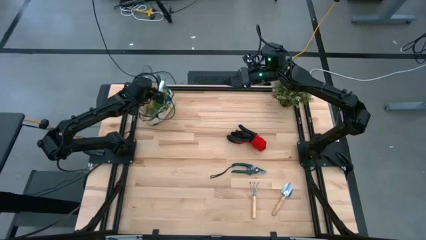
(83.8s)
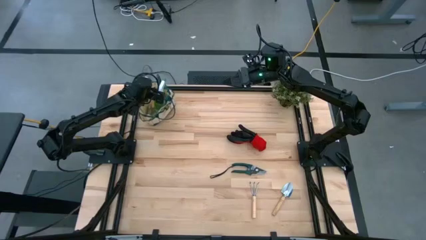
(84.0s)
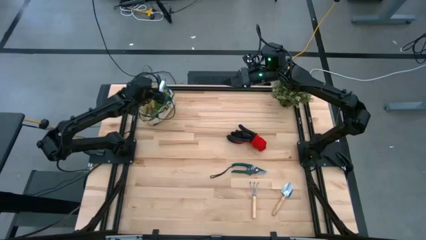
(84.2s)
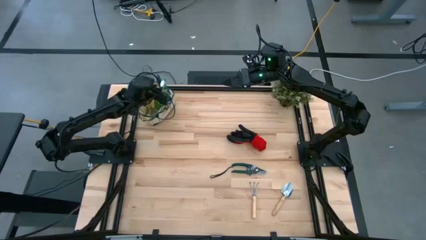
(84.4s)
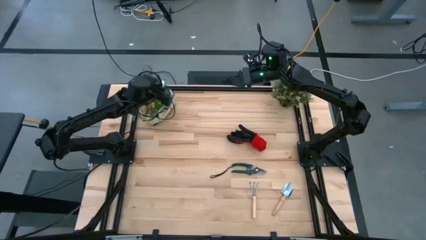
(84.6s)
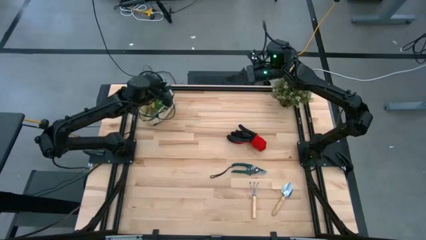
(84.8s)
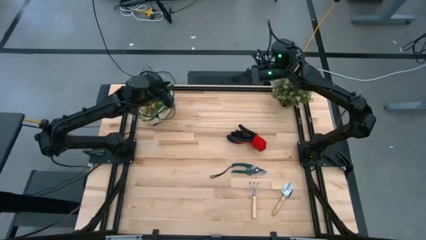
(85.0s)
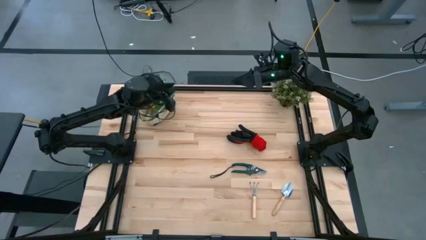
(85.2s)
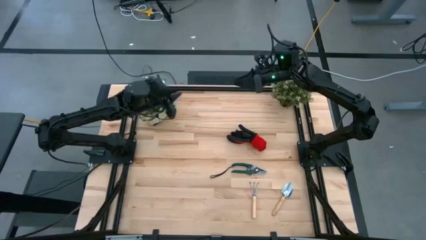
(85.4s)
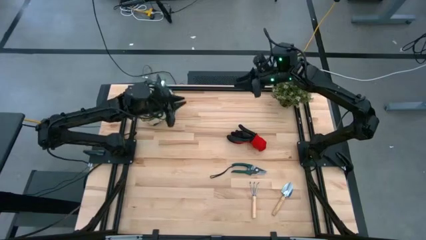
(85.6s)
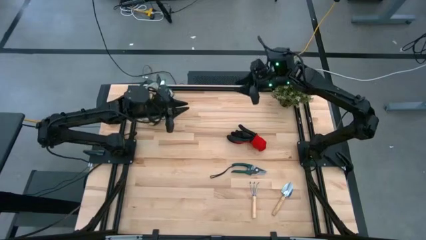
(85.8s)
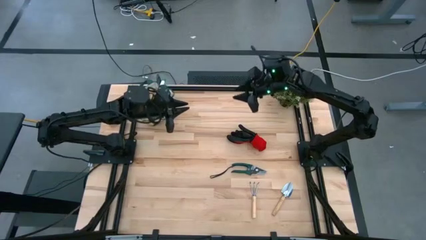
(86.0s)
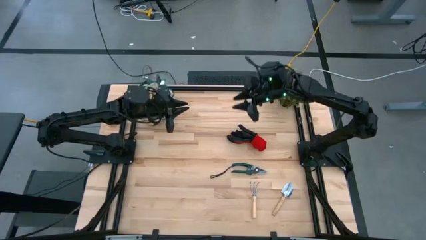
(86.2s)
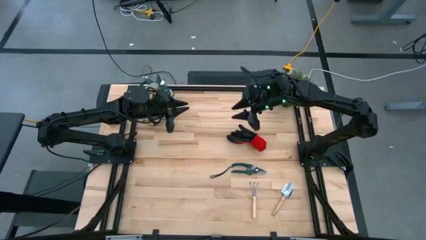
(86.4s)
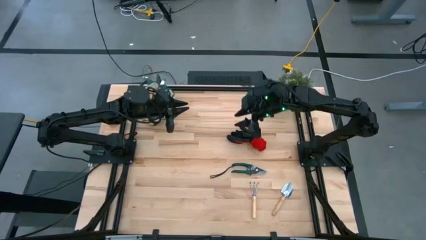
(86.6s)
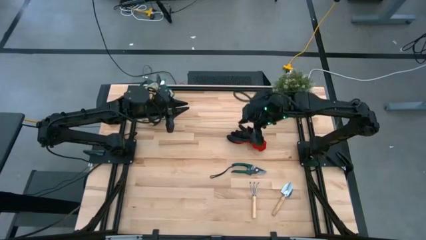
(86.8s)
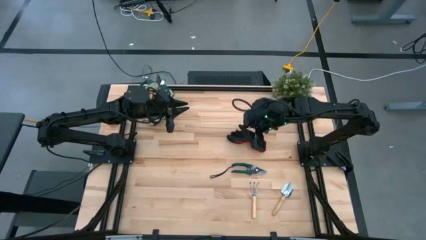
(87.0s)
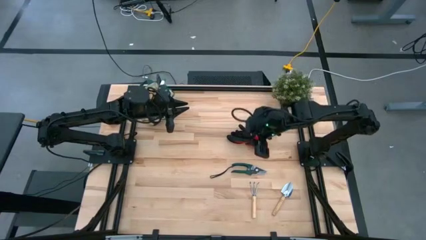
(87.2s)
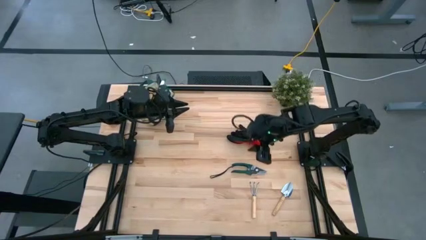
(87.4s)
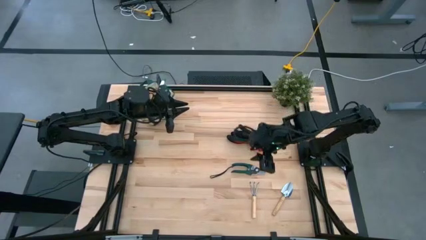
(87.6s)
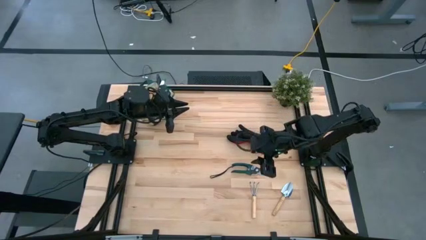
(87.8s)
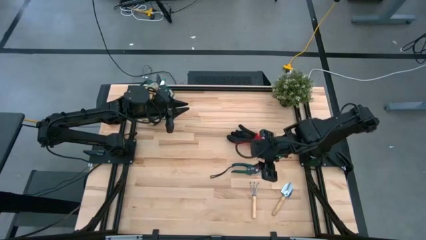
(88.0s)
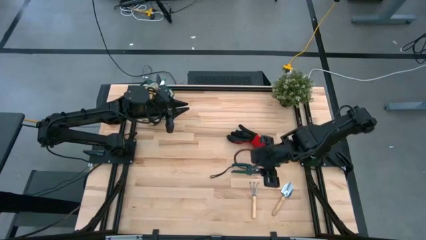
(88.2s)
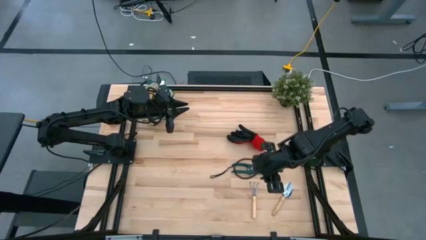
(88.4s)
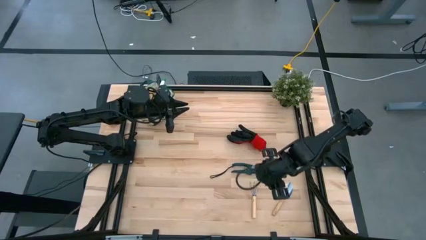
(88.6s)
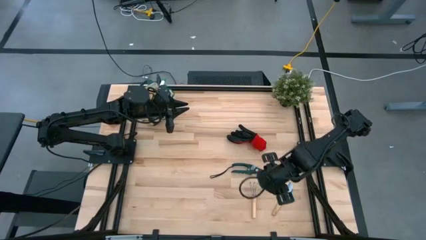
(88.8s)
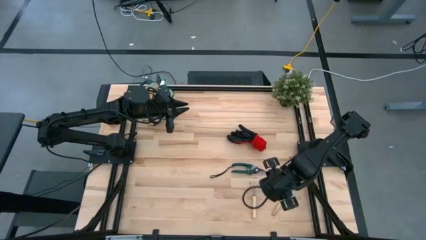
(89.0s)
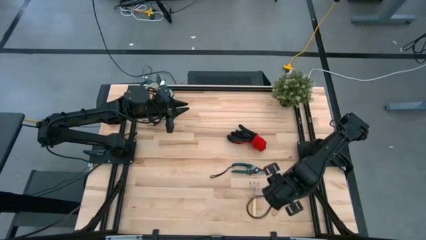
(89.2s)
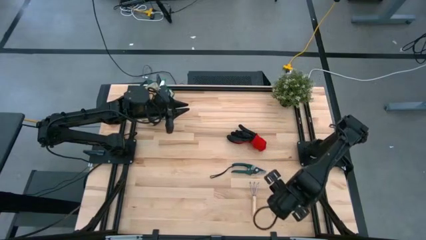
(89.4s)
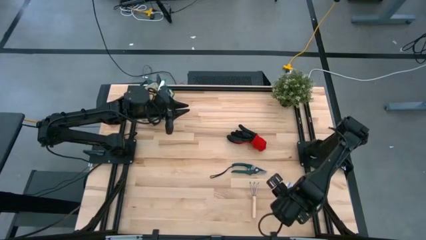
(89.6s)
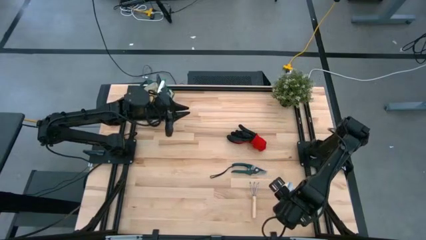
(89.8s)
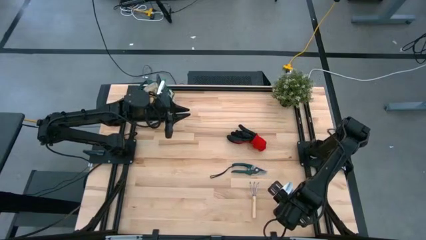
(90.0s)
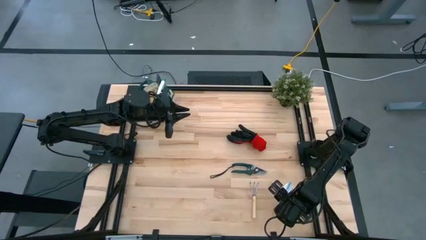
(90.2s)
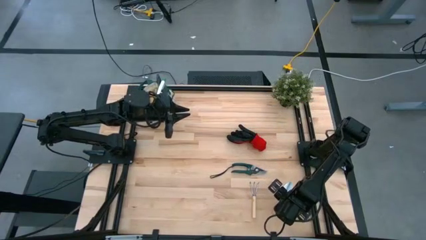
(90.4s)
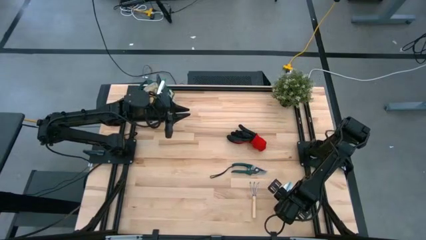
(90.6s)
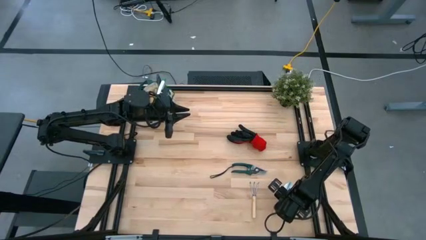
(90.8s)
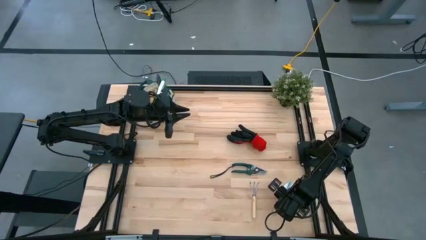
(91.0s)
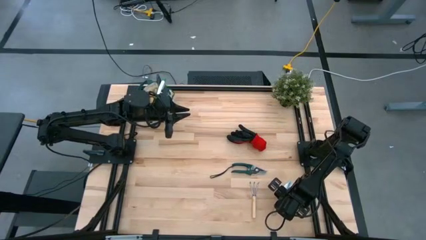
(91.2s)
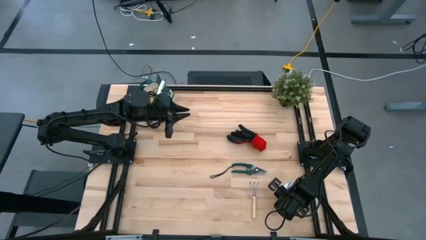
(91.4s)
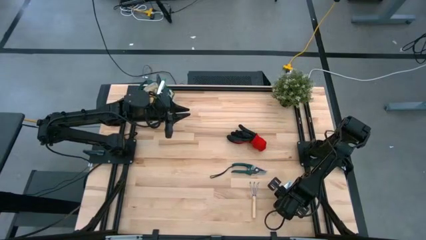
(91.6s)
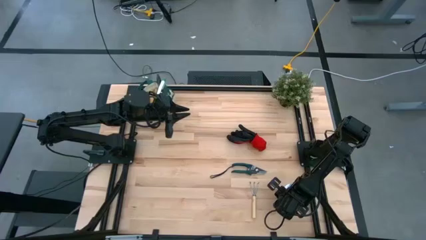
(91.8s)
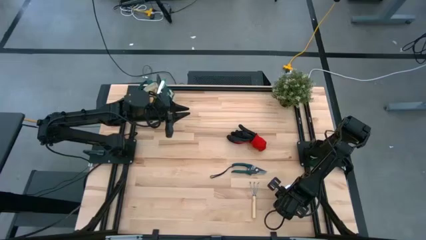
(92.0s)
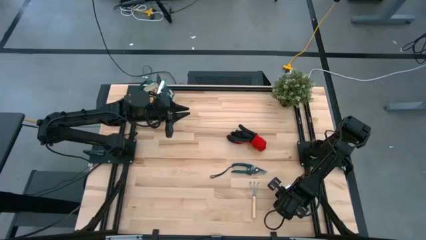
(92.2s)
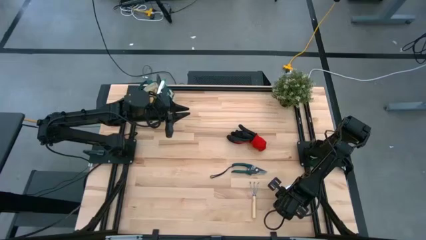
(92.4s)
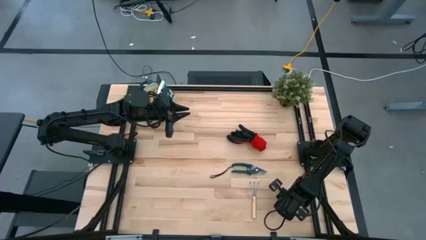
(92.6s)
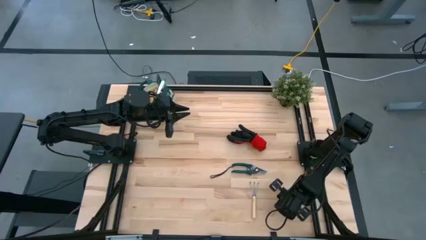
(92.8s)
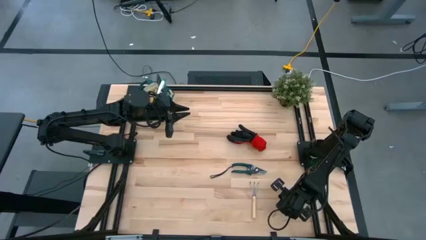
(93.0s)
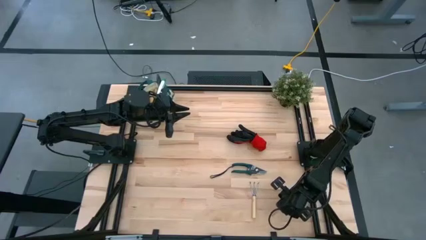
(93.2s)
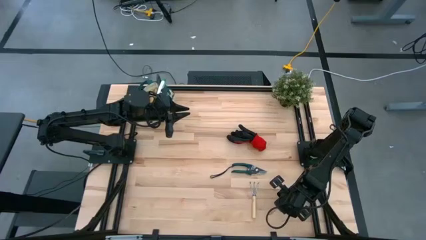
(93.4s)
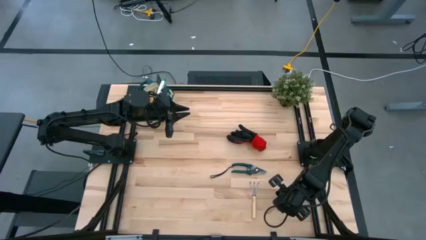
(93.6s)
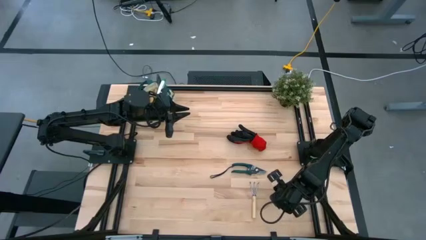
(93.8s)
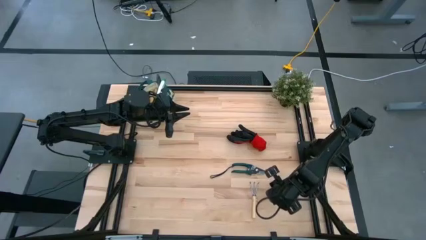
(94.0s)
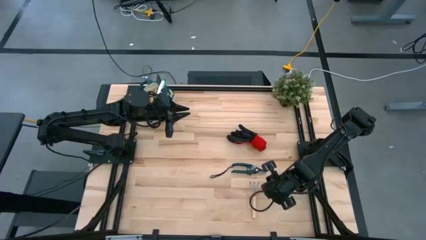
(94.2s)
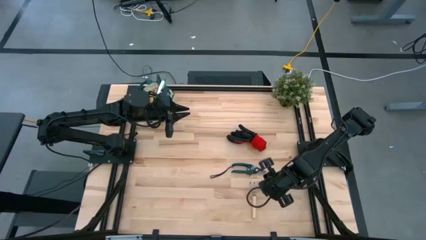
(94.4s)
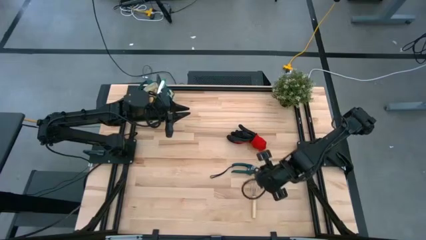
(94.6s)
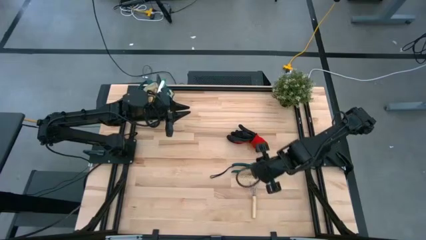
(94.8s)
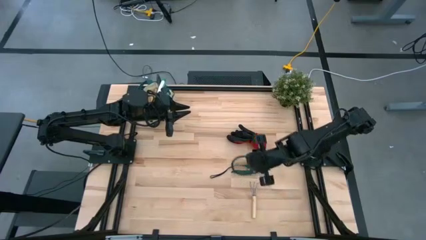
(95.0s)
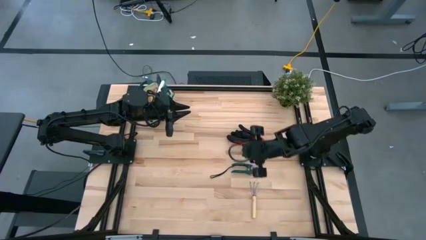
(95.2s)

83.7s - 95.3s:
Task: Pick & Place Garden tools in Gardening bag
Put the brown trowel into the gardening bag

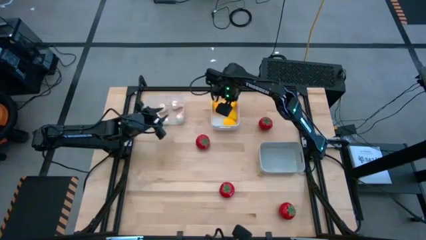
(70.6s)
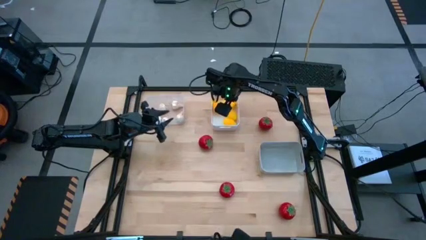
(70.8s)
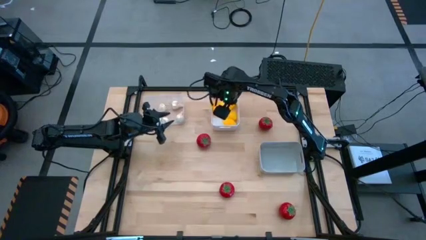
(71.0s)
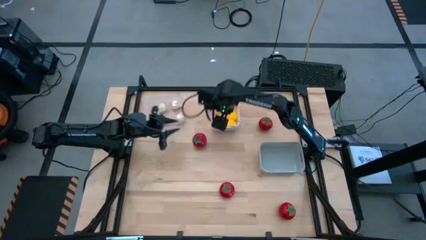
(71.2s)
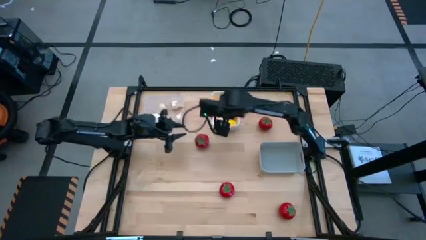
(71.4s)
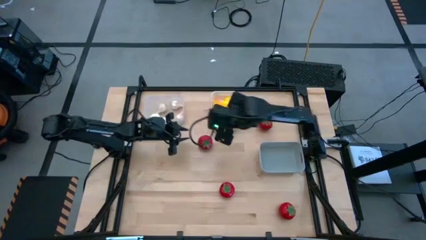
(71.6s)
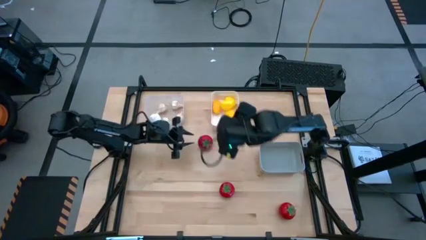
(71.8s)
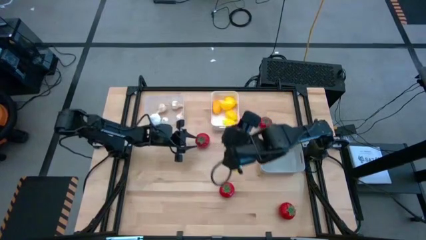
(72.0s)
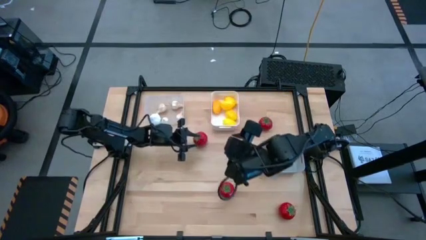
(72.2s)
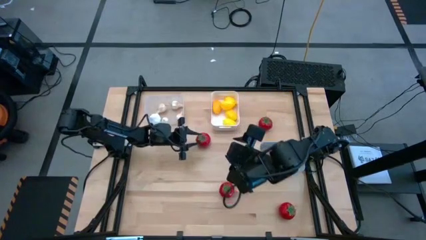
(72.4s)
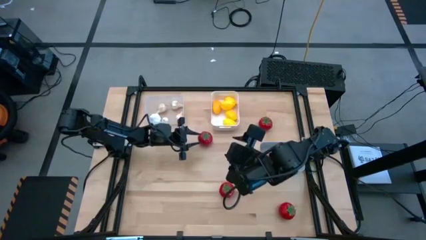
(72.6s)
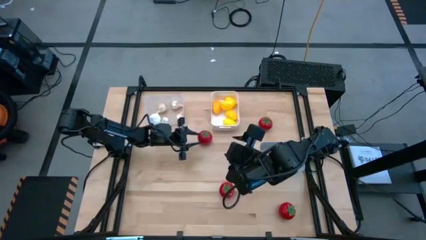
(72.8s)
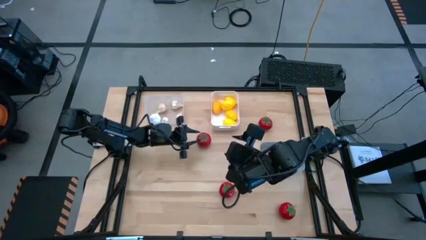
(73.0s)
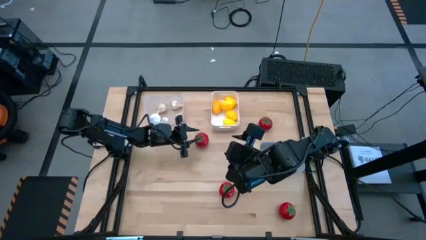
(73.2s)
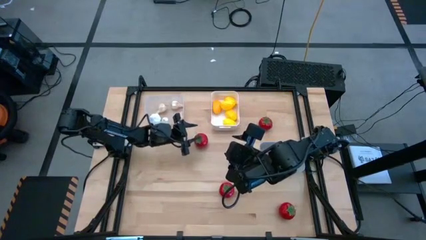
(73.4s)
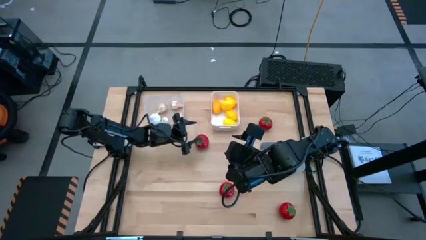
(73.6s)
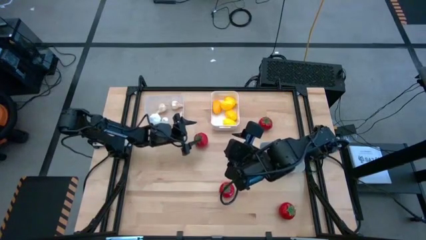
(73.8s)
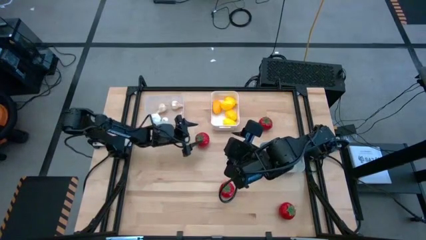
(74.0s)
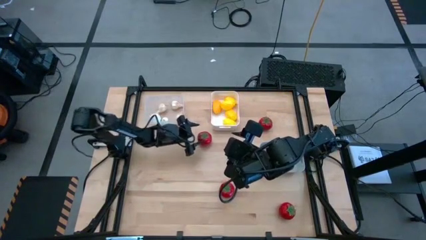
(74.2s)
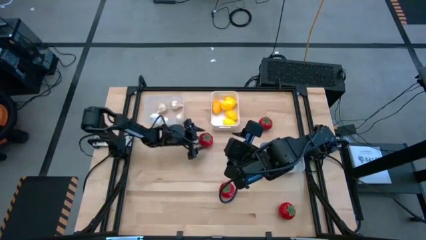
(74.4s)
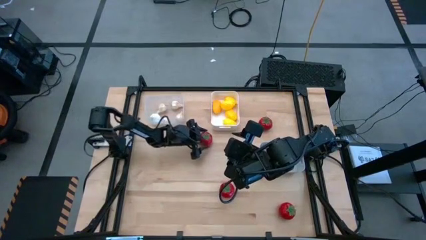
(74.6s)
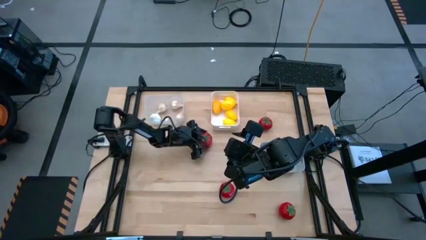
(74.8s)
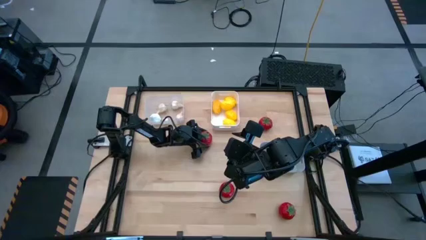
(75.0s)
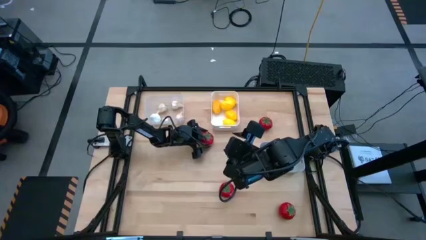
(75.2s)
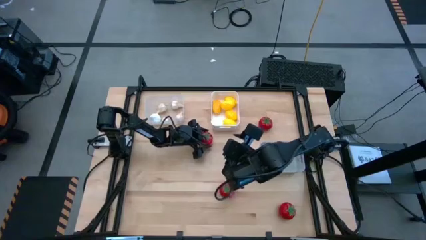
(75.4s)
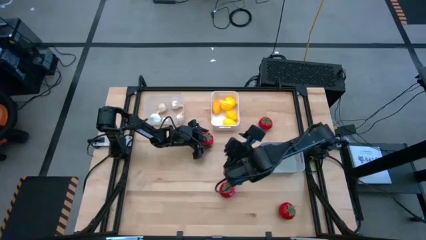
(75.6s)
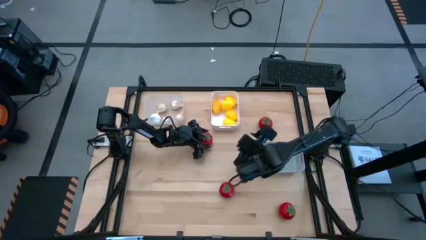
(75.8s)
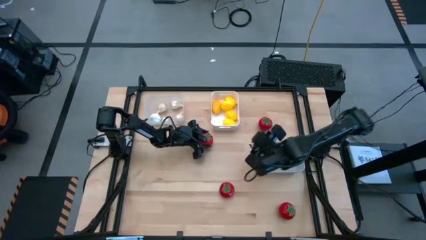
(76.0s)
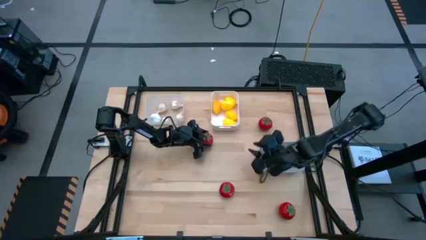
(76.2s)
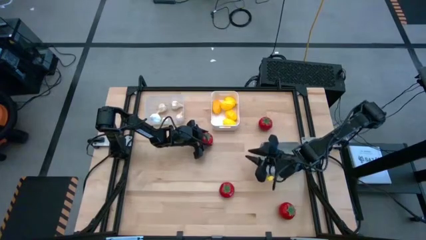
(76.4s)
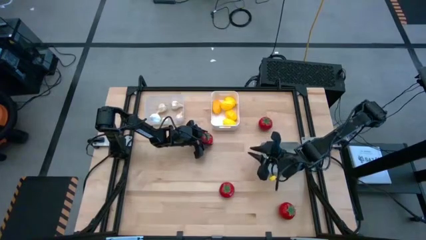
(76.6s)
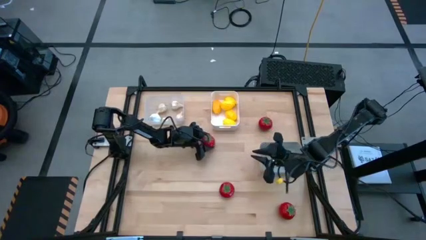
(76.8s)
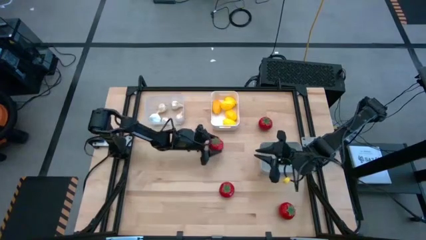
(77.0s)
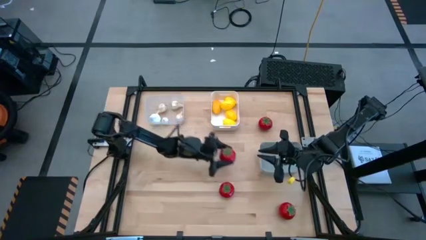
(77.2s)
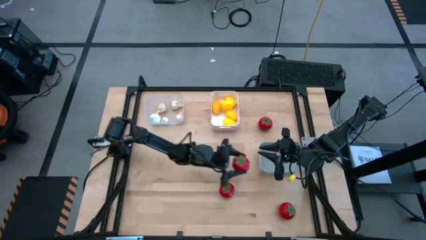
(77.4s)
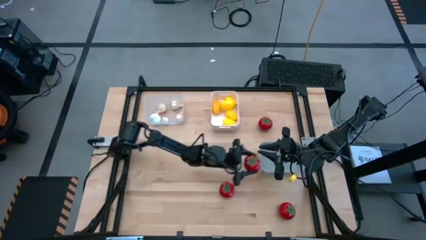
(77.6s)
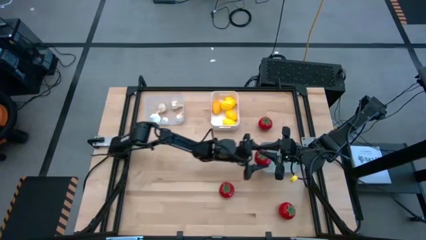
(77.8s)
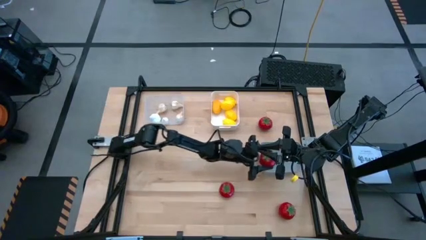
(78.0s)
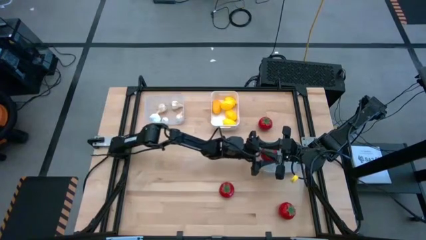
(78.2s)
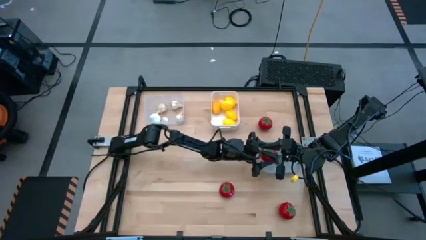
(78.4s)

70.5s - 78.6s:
Task: Sort produce into baskets
Put the tomato into the gray bin
